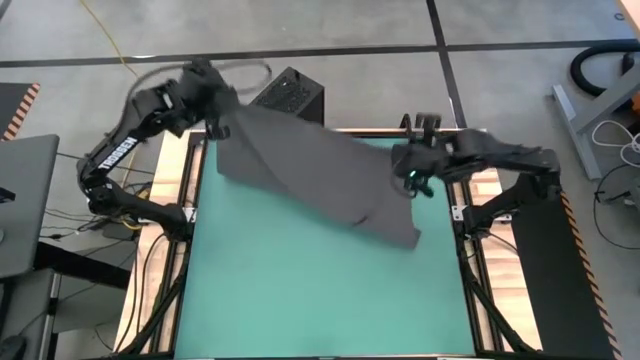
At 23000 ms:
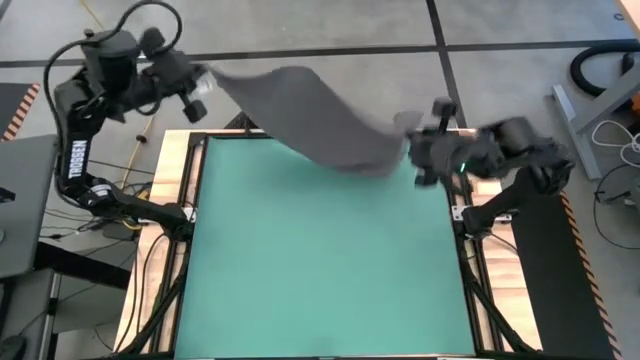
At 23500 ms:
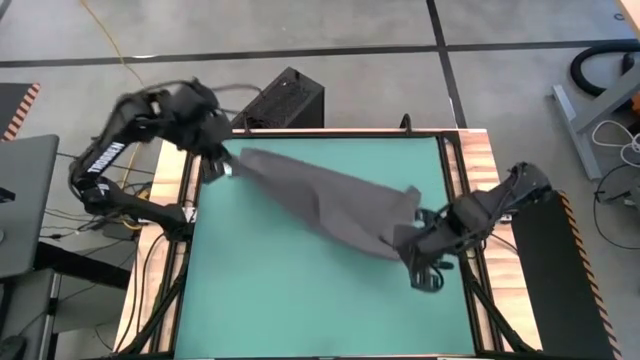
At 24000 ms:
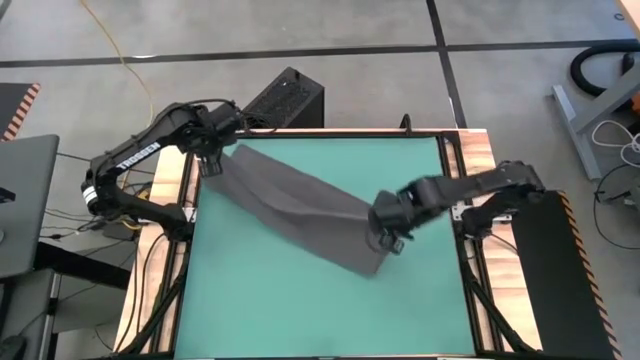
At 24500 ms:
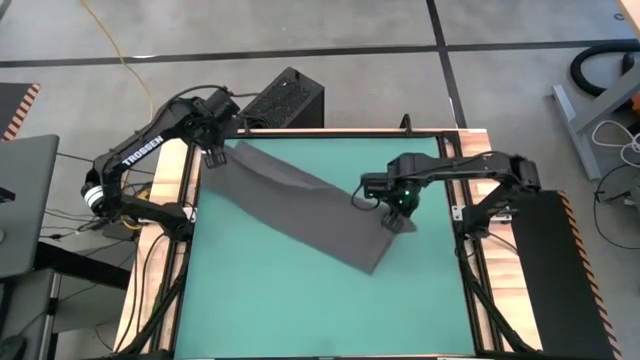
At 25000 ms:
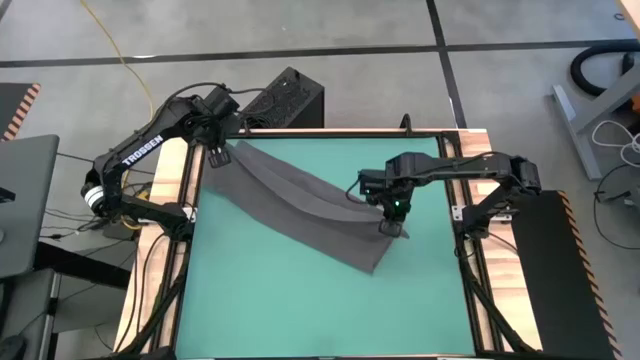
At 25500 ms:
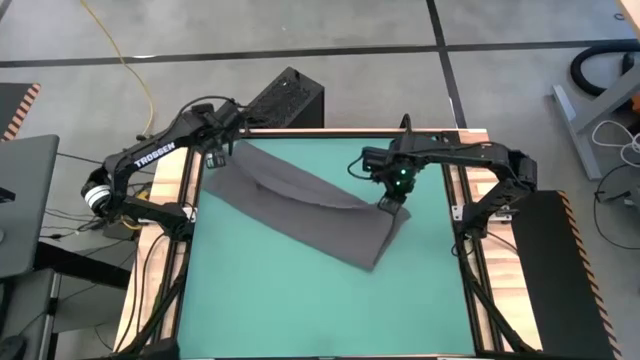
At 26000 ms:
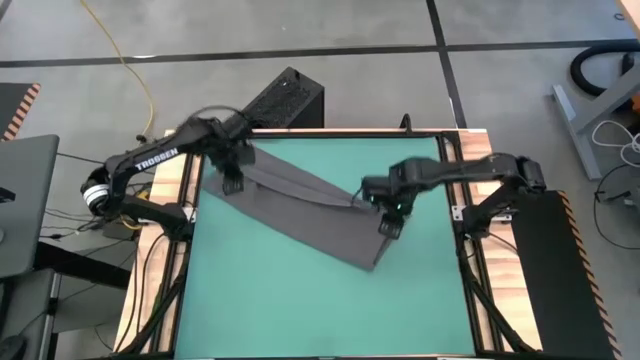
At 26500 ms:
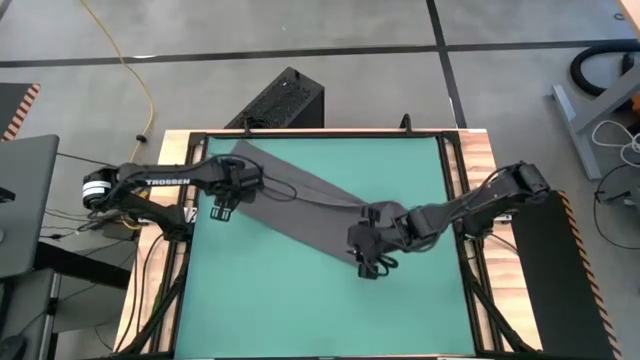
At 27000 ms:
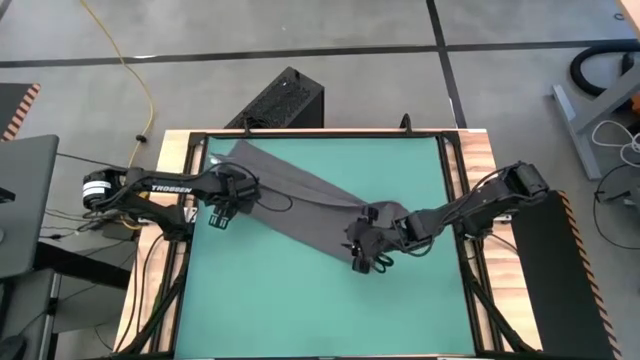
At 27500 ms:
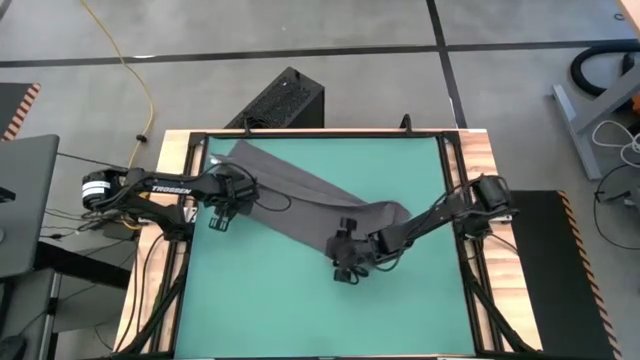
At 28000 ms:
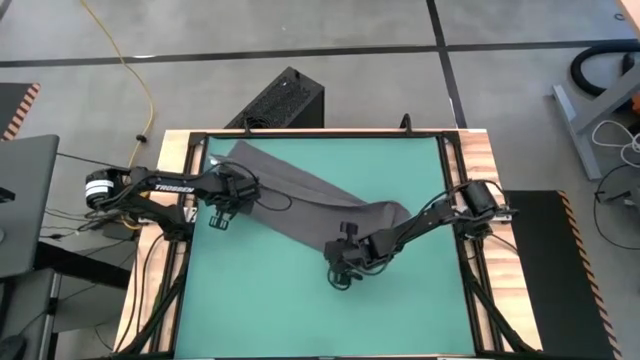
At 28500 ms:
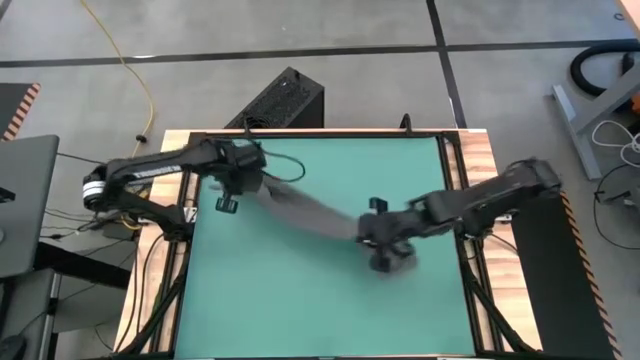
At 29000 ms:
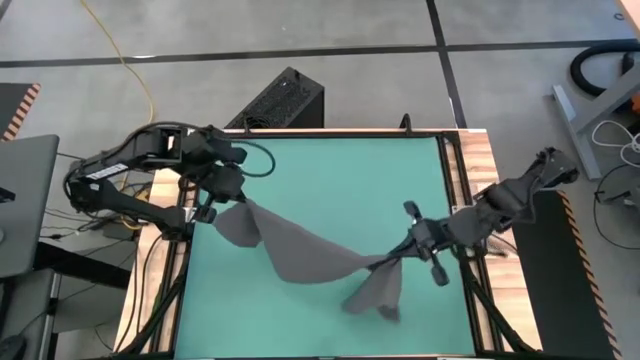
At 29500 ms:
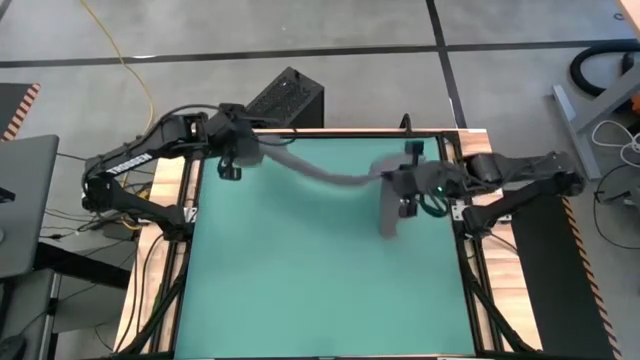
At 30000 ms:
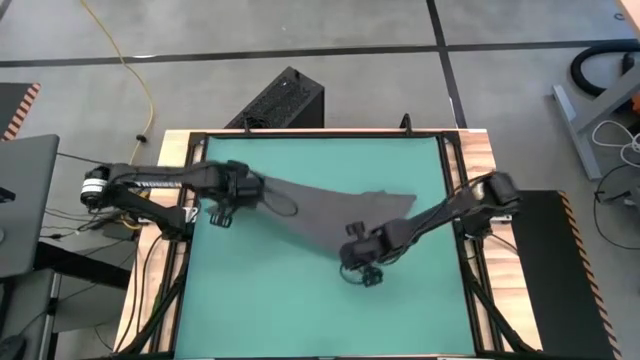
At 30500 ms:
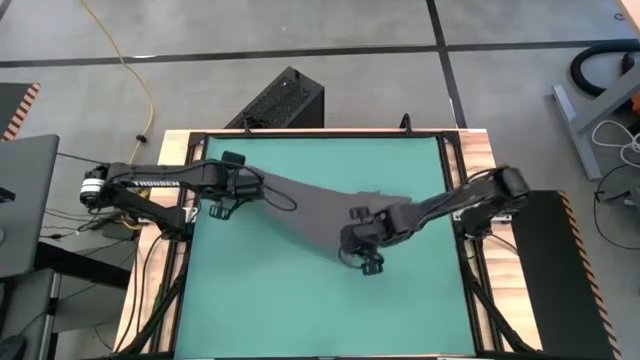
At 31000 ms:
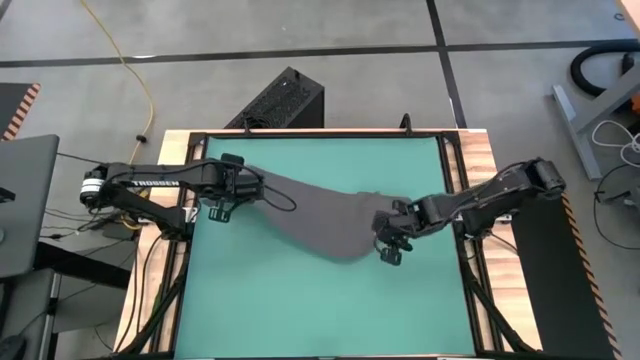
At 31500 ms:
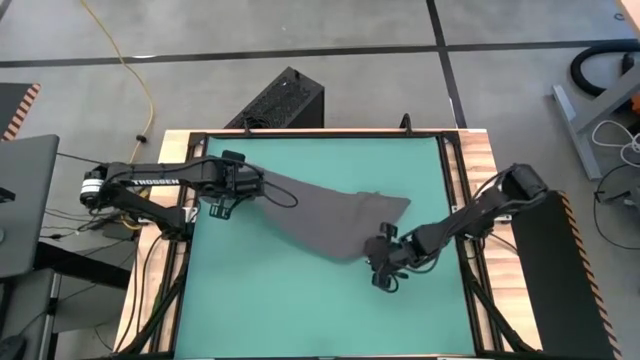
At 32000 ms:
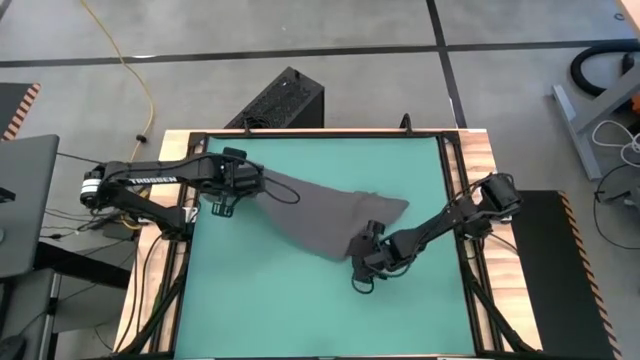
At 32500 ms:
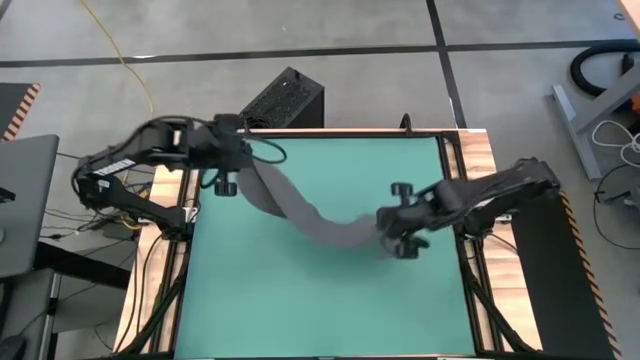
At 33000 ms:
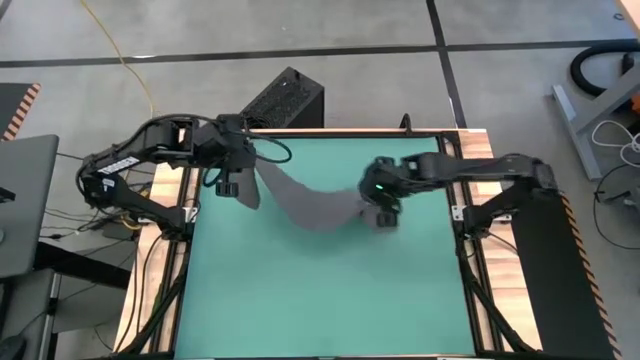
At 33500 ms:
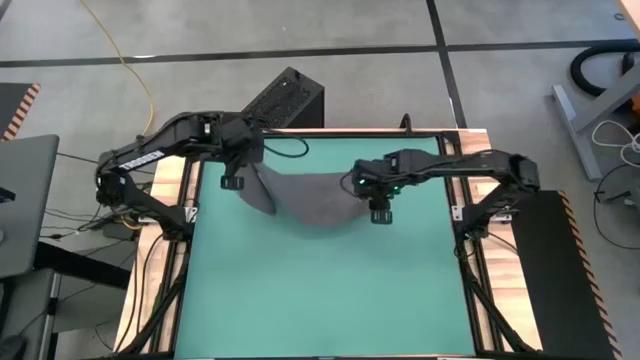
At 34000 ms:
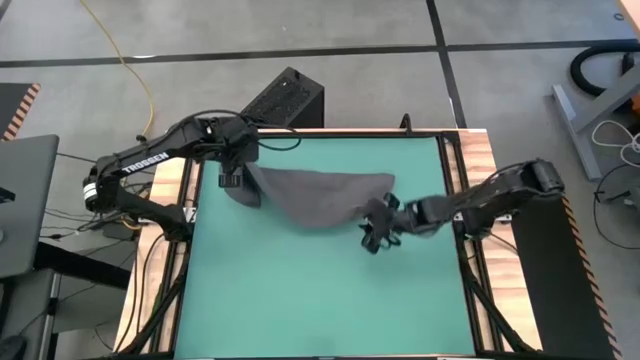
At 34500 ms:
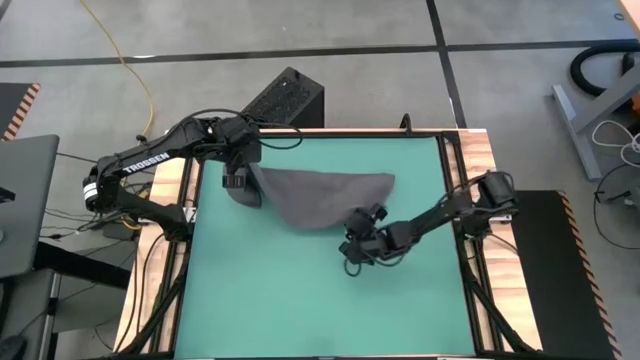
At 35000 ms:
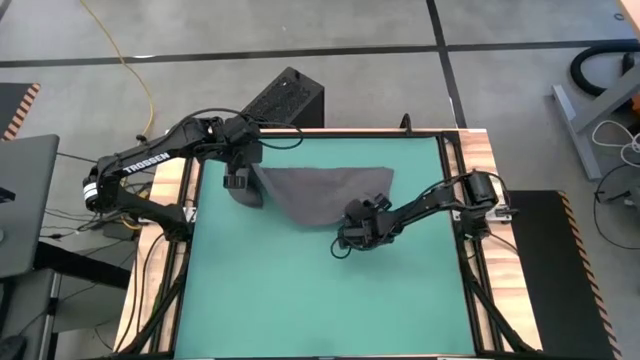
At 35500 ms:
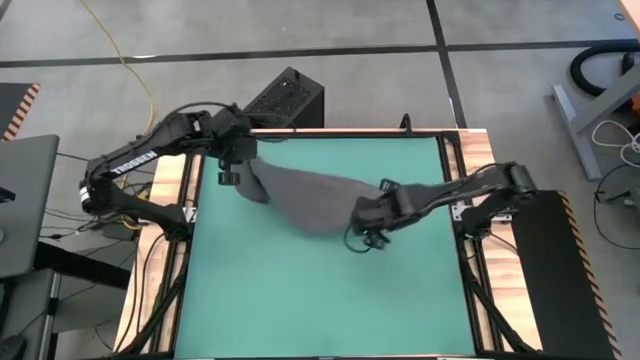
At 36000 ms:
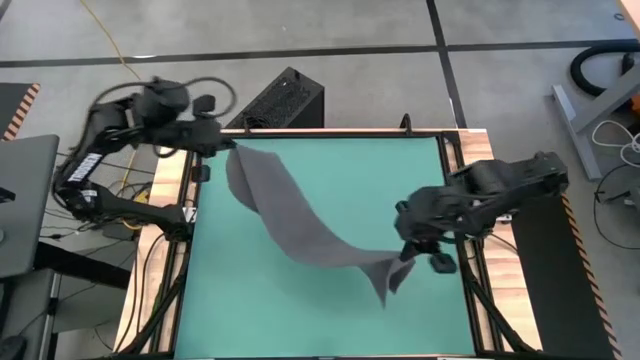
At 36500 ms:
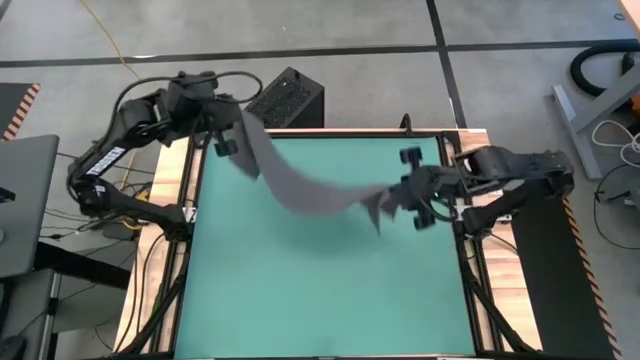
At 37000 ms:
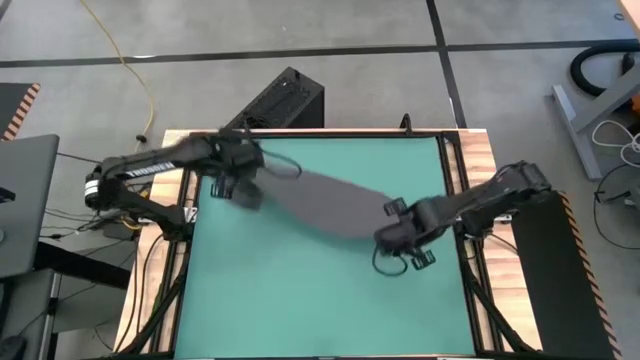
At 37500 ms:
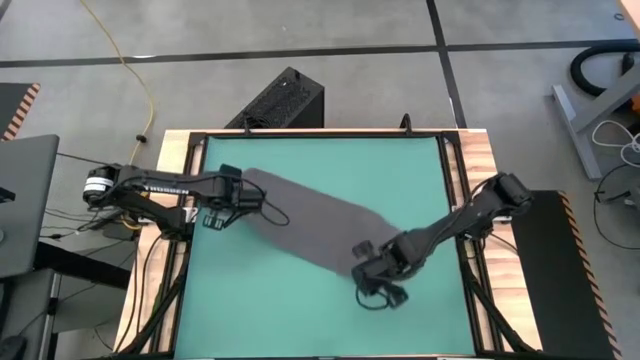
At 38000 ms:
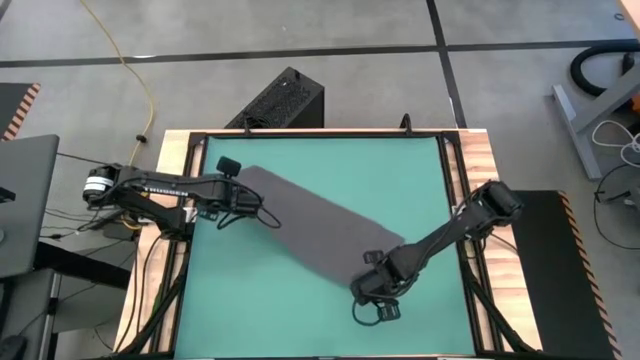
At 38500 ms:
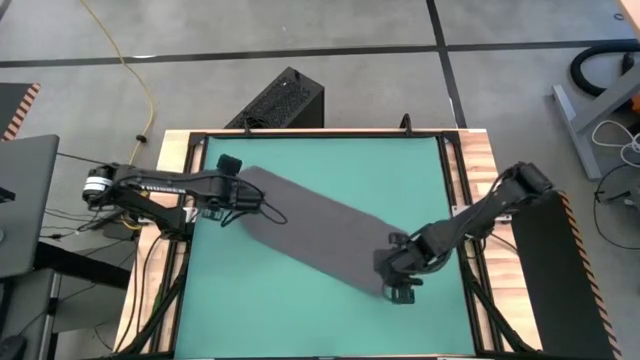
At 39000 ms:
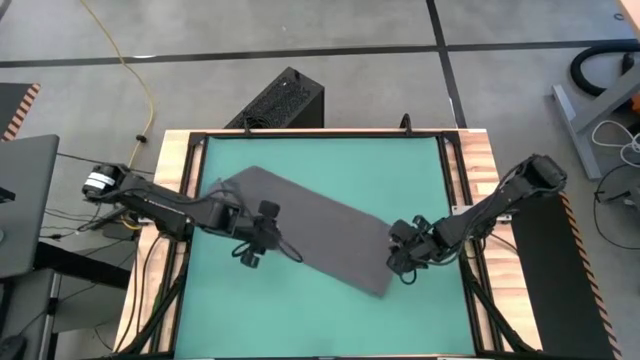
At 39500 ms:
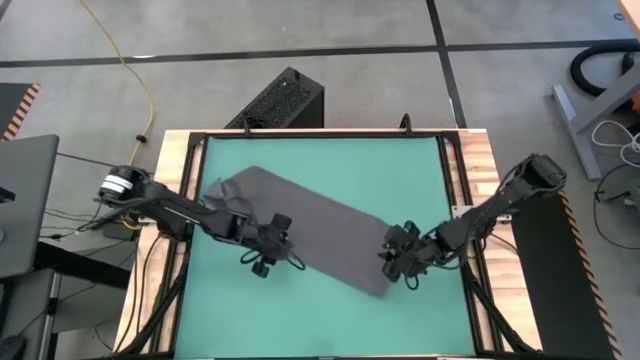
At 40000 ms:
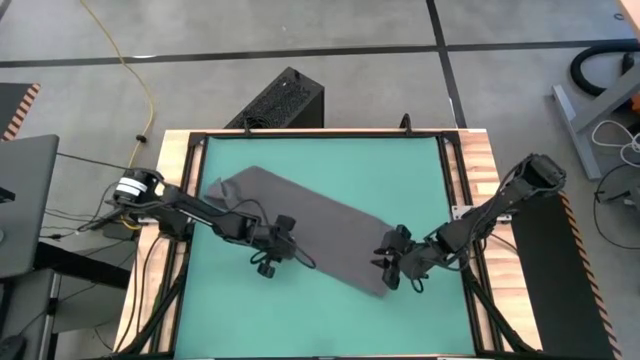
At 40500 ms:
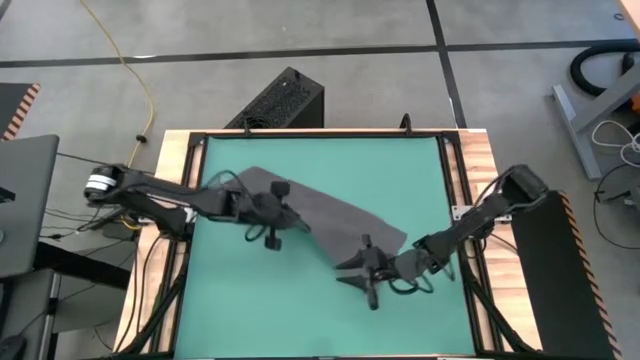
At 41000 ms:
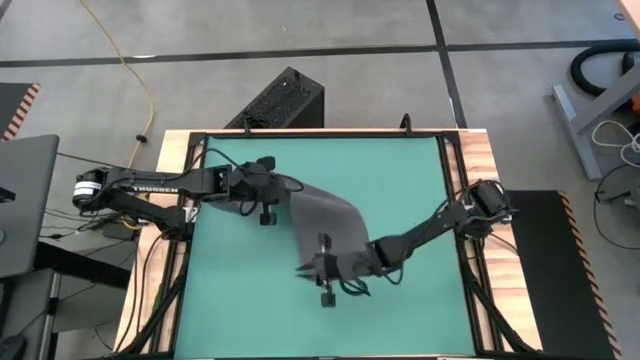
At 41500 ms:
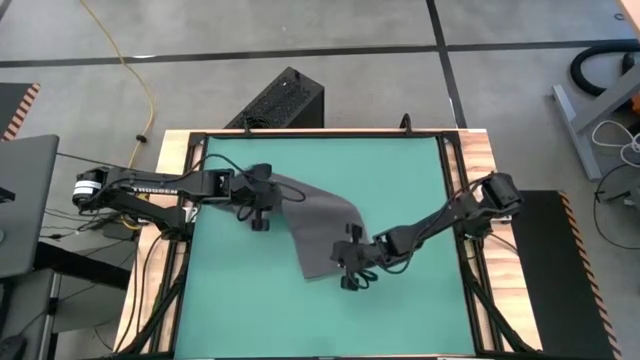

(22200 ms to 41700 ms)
Task: Roll towel
Roll the gray towel
